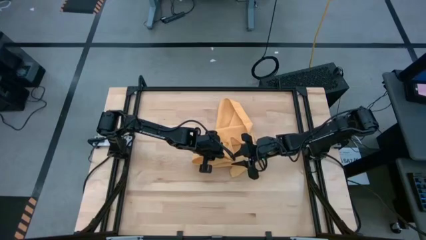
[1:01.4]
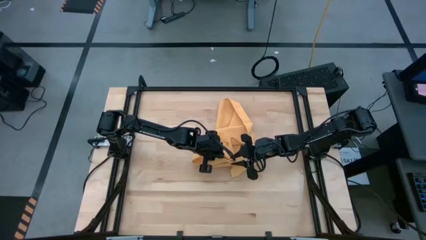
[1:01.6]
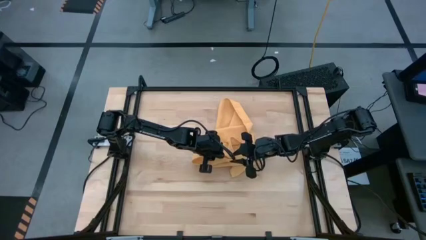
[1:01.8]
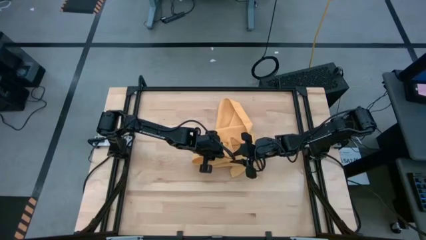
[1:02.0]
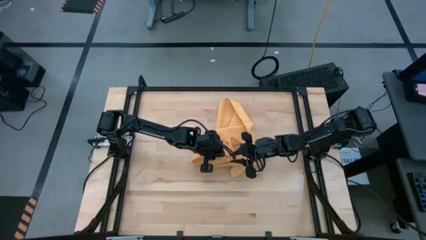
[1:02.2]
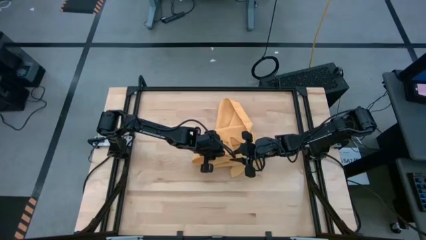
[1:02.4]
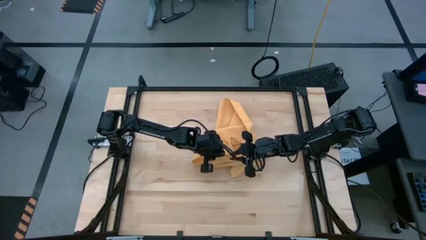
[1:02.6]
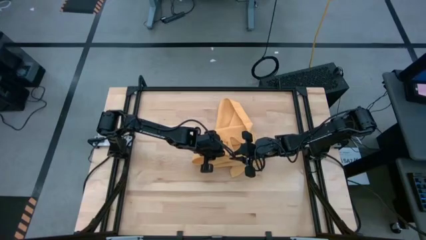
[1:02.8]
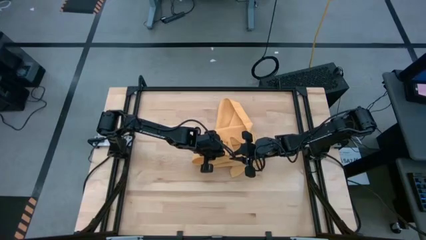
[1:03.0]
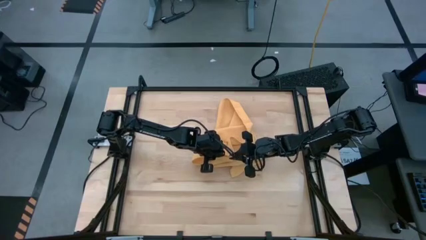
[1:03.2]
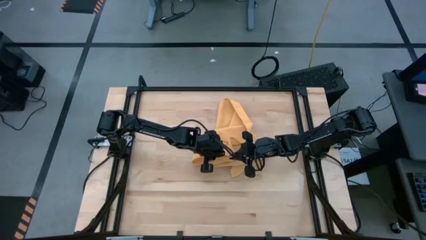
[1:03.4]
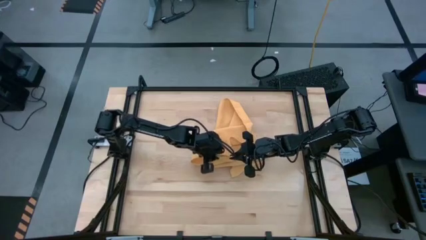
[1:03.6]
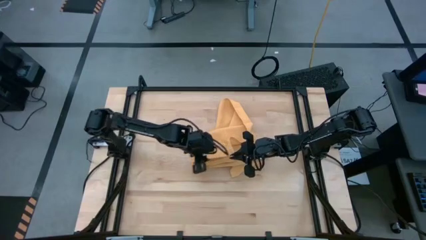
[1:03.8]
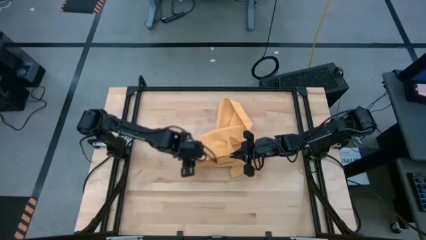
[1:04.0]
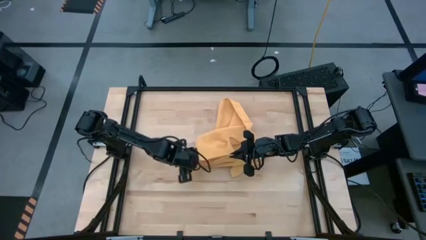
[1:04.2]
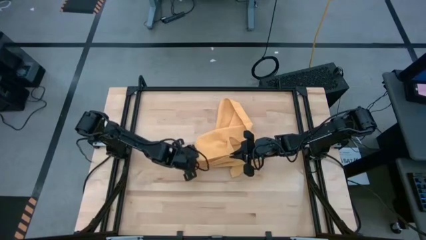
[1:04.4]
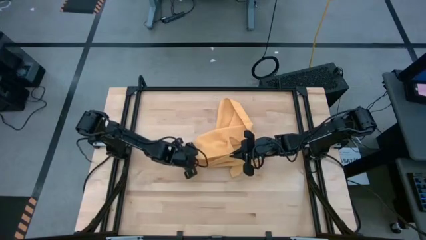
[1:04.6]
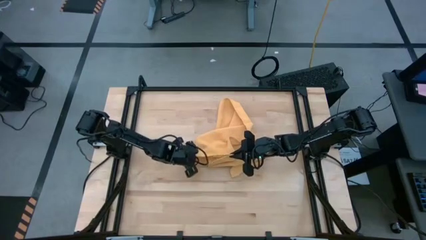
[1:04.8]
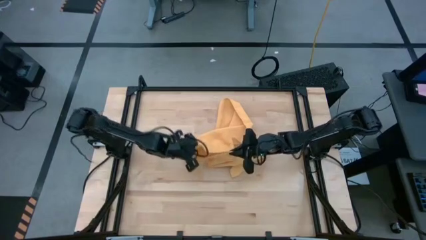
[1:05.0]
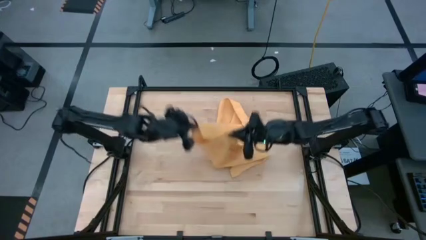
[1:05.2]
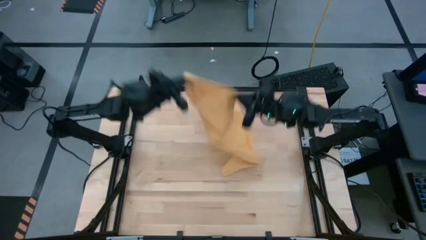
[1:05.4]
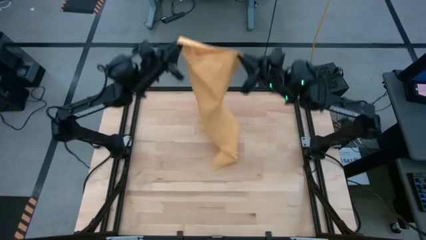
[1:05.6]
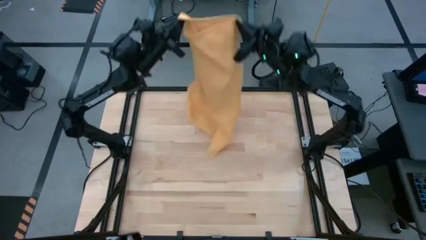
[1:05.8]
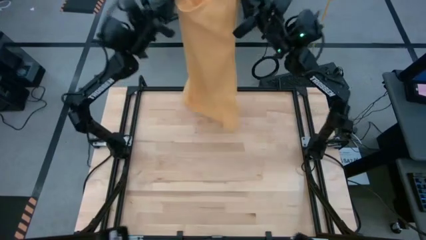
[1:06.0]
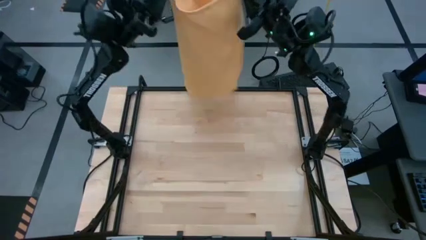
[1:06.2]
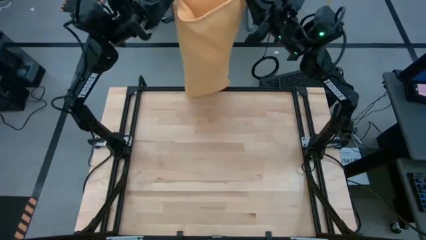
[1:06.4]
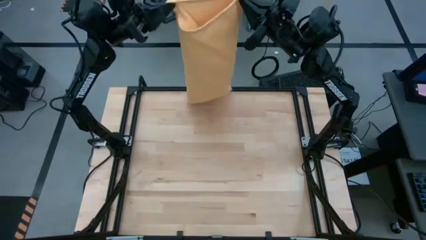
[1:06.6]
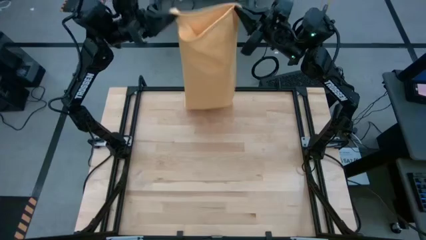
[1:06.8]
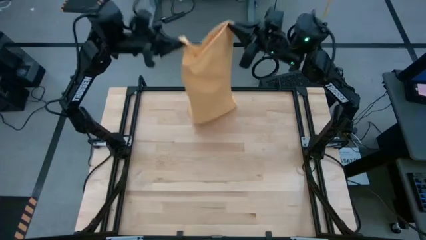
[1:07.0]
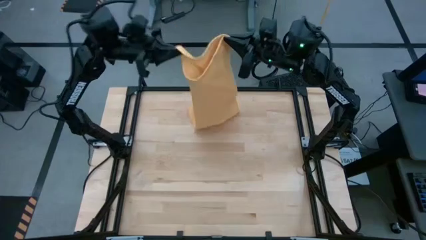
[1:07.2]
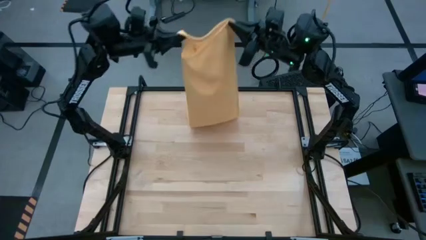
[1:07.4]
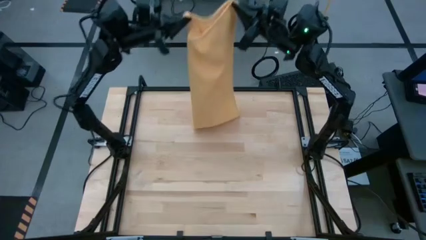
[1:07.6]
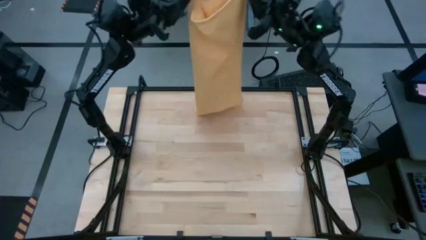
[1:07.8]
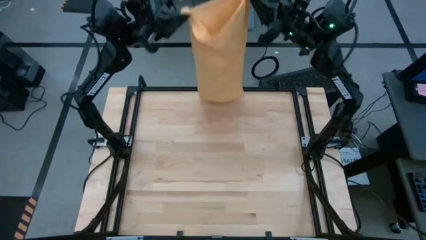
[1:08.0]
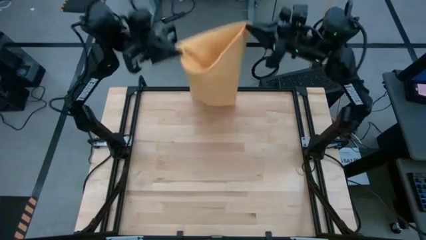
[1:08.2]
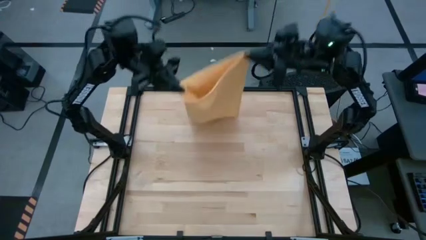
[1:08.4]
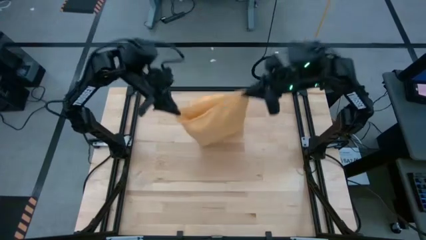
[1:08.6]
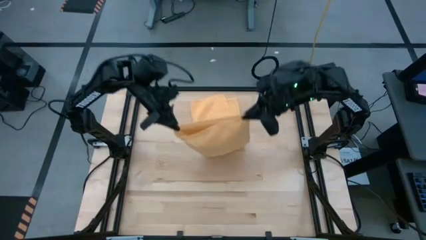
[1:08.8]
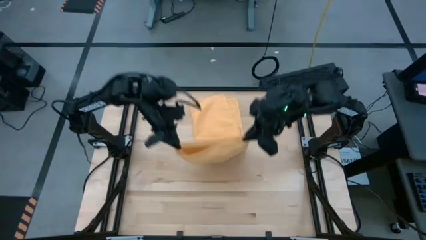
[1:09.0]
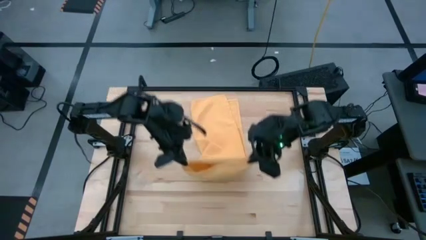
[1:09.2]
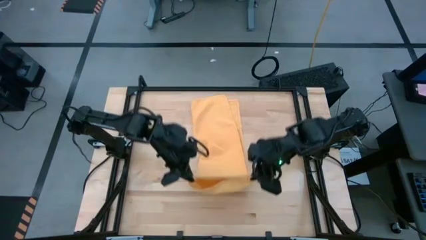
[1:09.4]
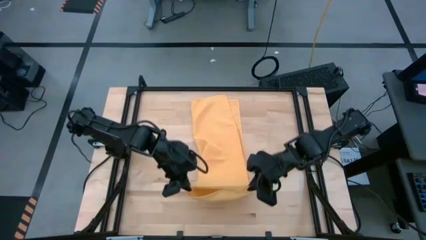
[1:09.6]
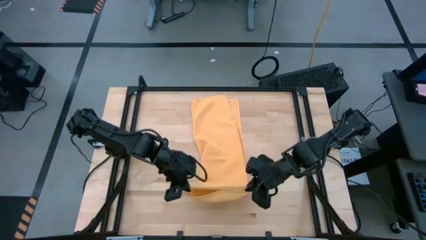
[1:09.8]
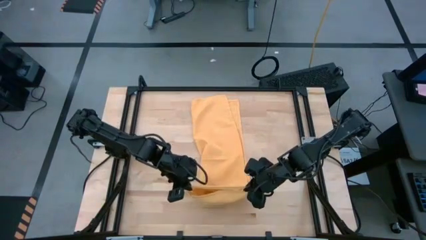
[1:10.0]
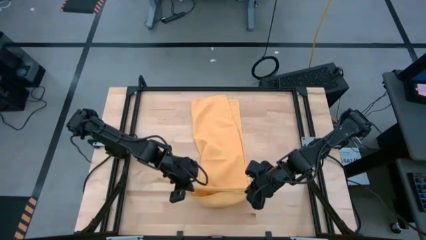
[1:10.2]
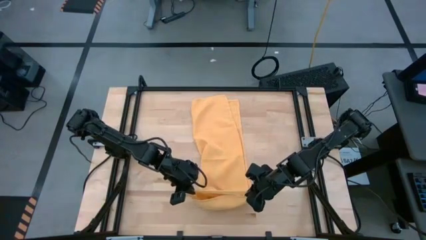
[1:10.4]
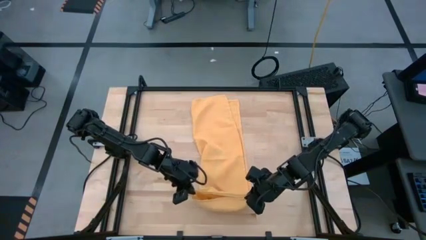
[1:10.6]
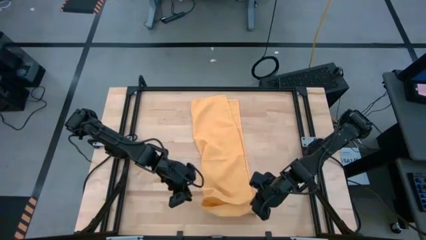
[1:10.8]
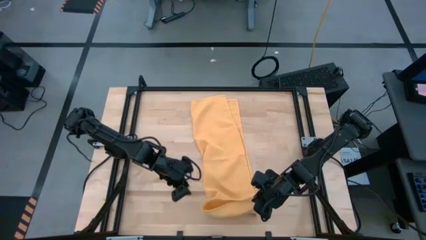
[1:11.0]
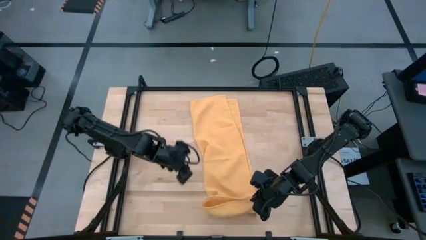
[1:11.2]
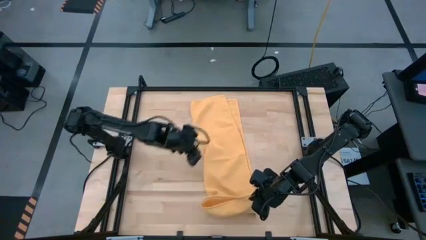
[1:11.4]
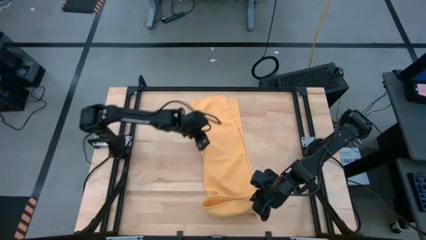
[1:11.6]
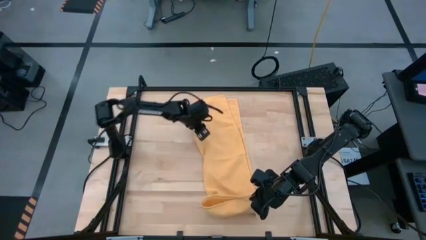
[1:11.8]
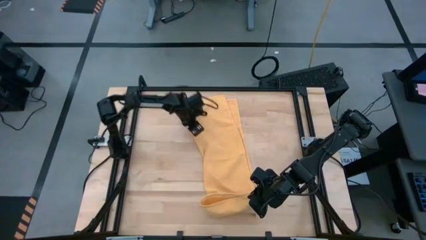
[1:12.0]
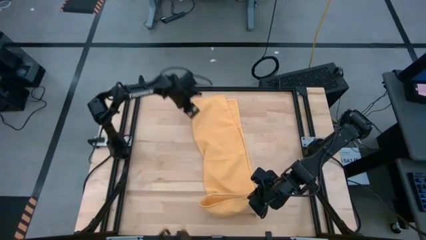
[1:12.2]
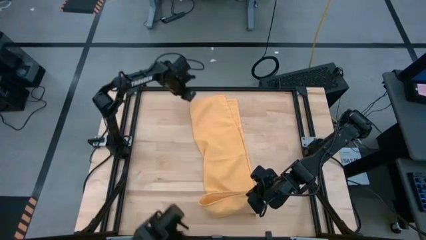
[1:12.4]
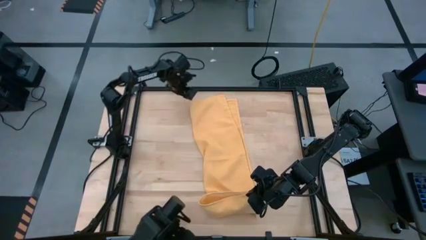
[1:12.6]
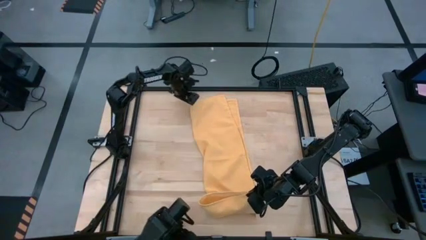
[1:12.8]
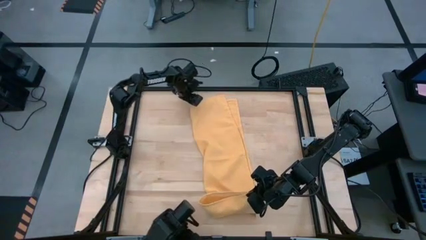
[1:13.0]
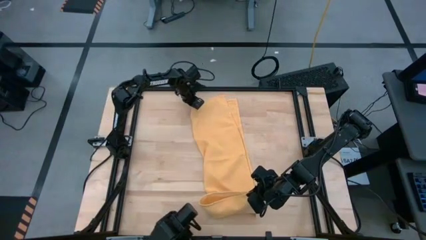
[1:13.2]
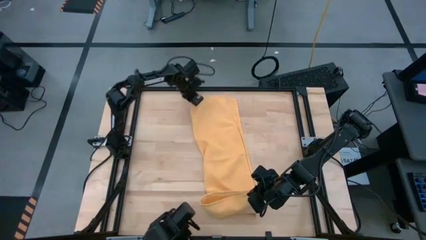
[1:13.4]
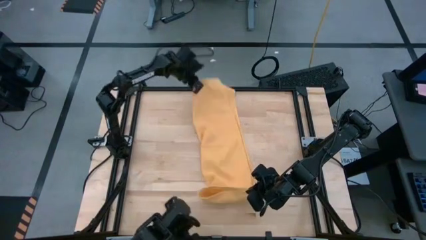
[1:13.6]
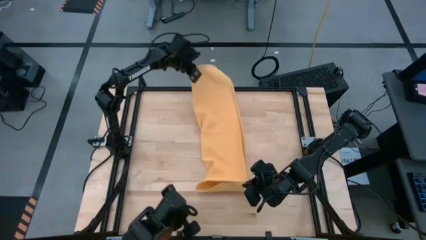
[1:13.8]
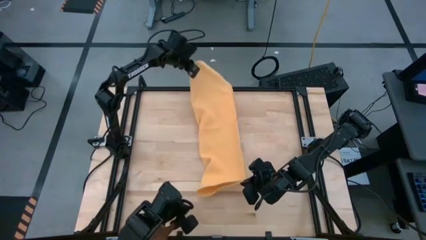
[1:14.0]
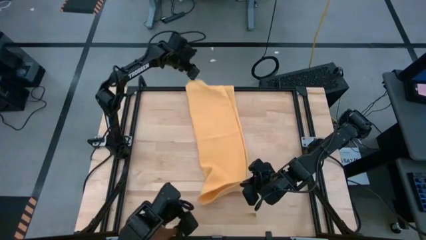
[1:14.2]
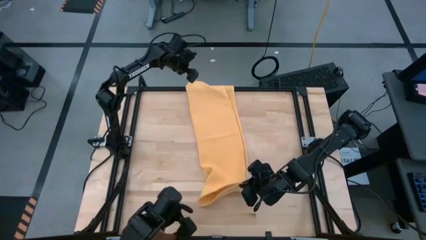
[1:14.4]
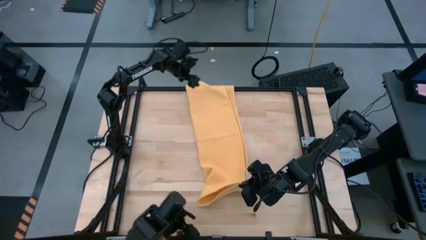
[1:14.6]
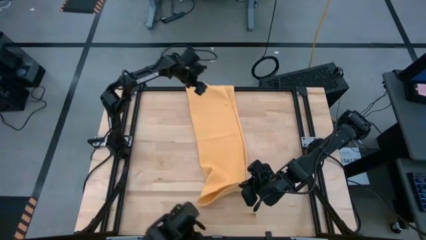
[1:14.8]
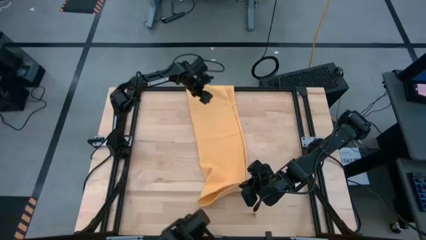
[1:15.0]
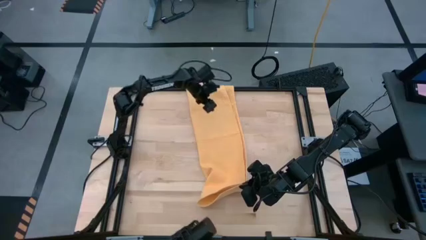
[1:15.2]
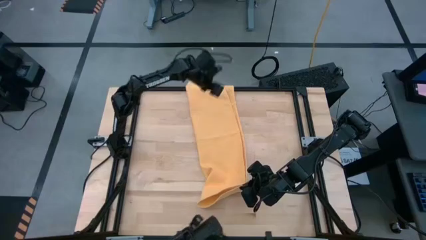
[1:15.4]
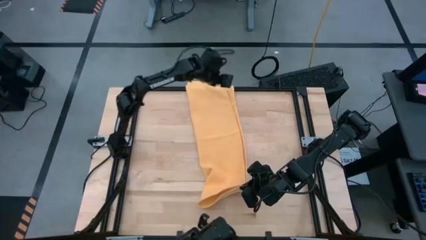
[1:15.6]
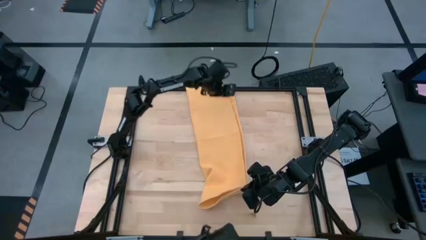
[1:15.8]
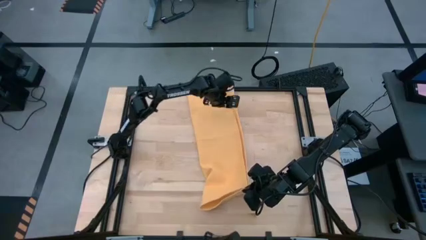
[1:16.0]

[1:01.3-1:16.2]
Task: Roll towel
Roll the yellow towel

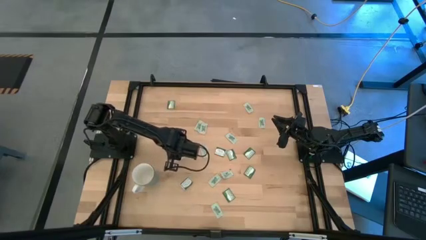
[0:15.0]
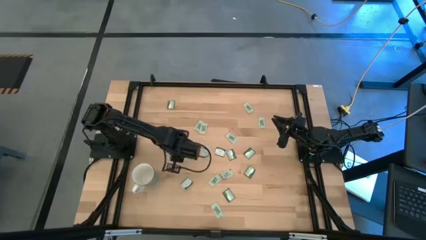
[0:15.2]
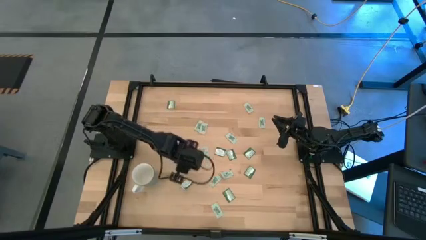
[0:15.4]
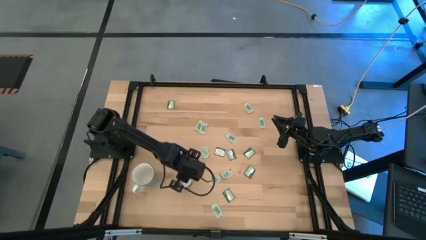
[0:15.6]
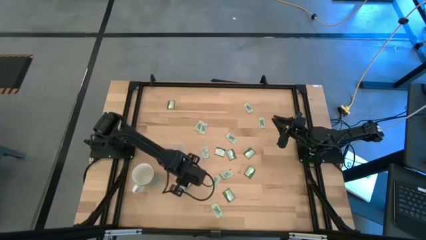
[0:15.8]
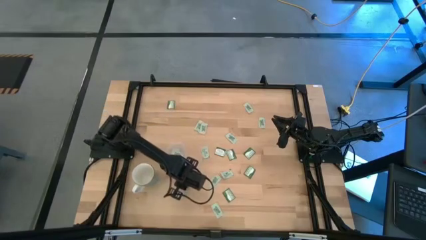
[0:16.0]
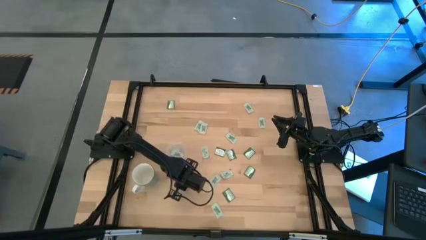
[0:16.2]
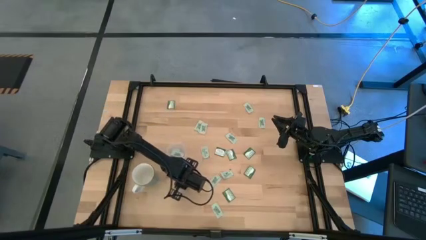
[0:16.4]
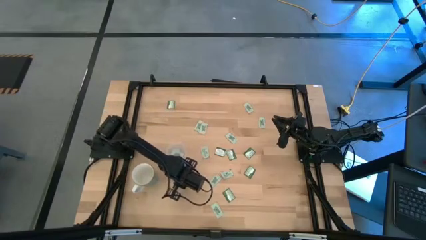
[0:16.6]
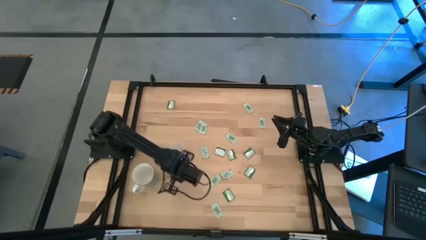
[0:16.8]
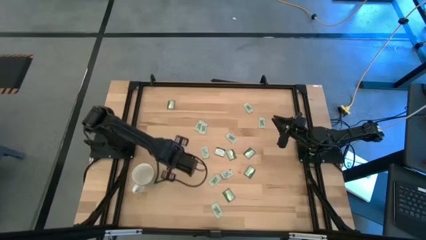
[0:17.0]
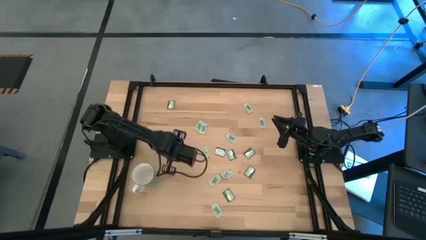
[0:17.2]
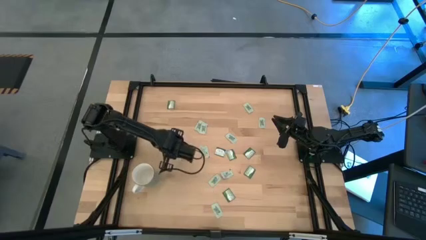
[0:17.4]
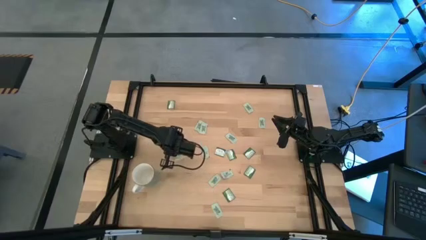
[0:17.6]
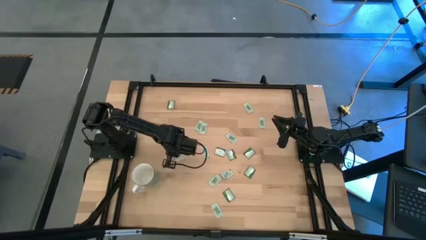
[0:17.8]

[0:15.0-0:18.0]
Task: Pick and place Stevia / Truvia into bins
Put the dark green stevia packet into the transparent container
